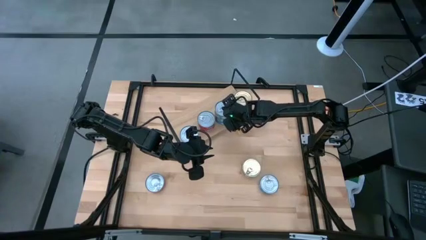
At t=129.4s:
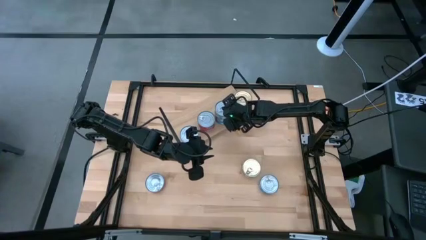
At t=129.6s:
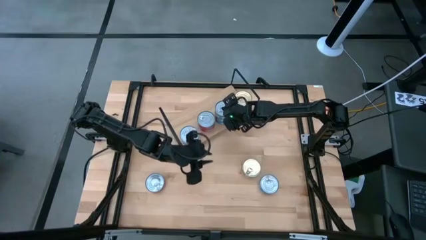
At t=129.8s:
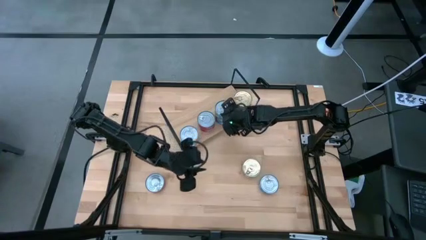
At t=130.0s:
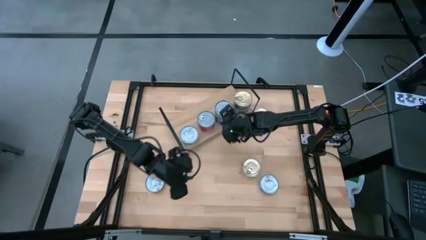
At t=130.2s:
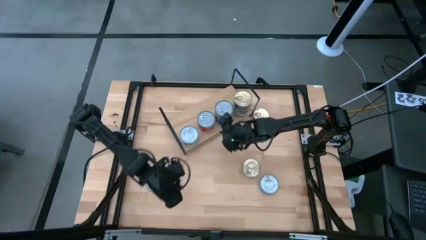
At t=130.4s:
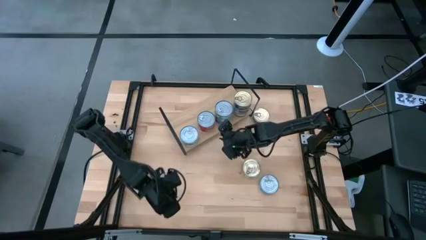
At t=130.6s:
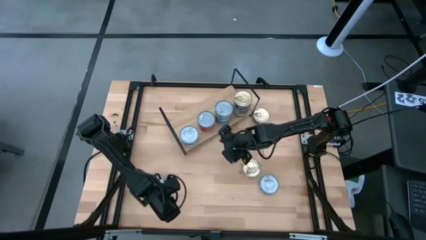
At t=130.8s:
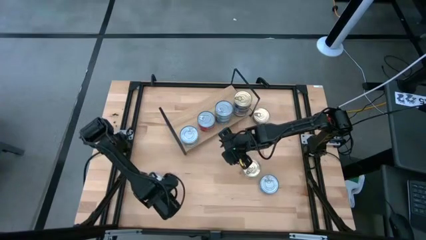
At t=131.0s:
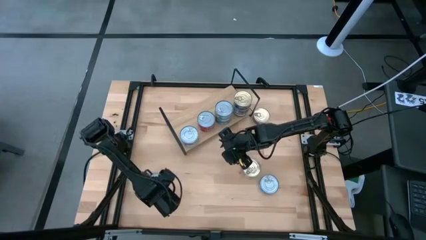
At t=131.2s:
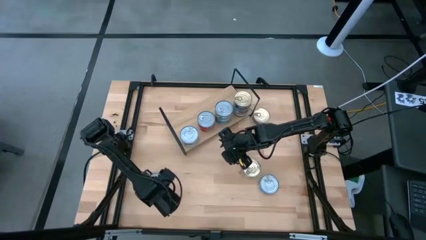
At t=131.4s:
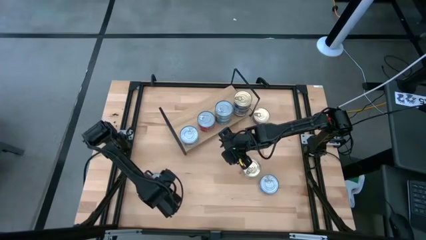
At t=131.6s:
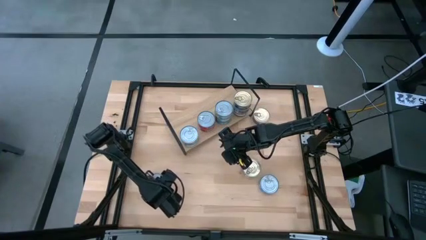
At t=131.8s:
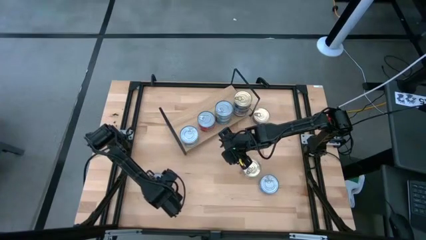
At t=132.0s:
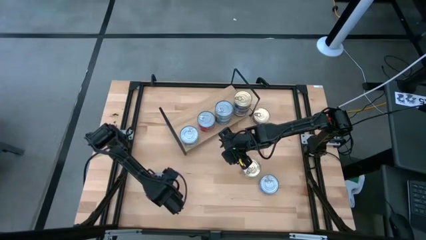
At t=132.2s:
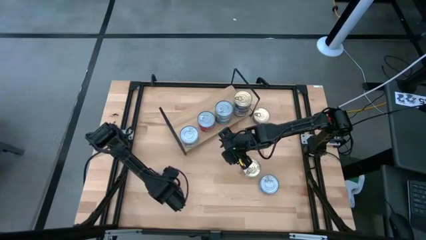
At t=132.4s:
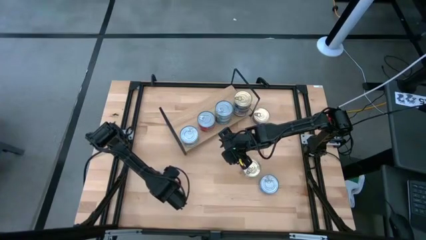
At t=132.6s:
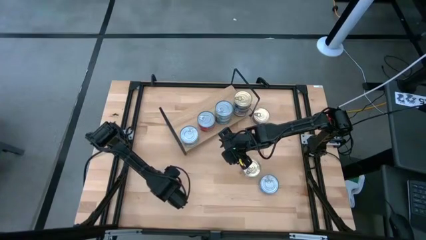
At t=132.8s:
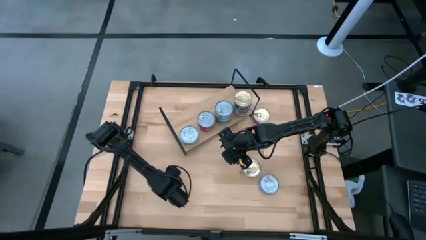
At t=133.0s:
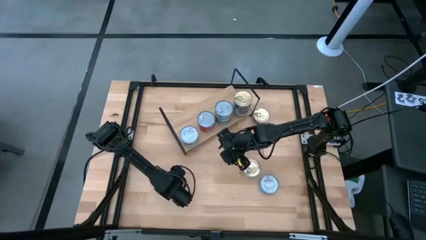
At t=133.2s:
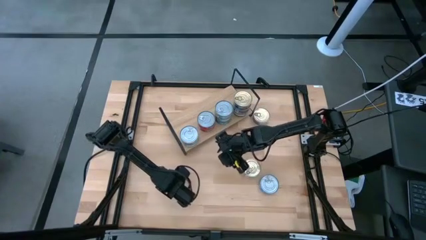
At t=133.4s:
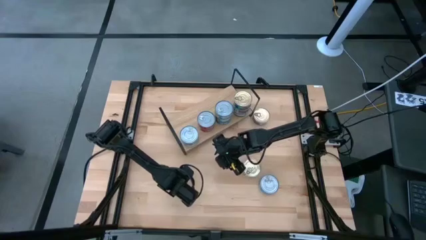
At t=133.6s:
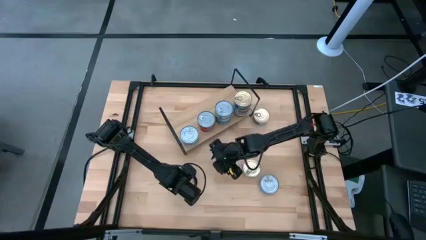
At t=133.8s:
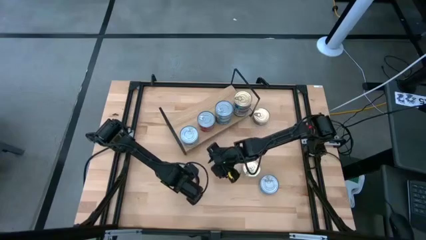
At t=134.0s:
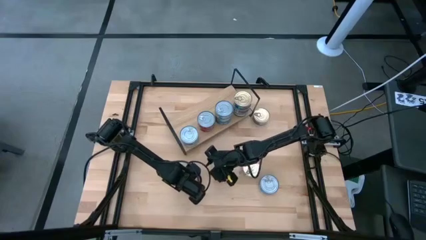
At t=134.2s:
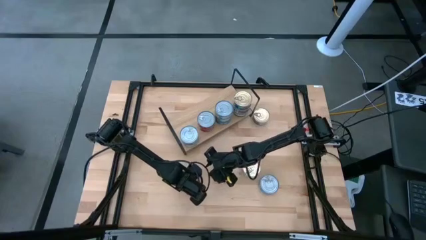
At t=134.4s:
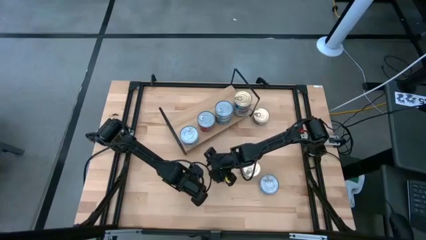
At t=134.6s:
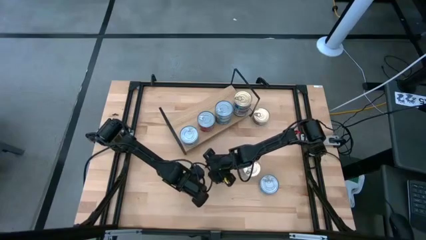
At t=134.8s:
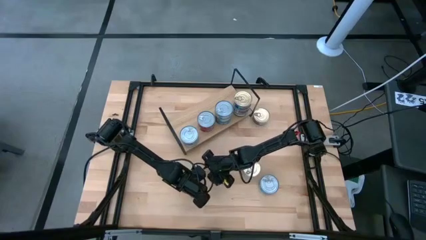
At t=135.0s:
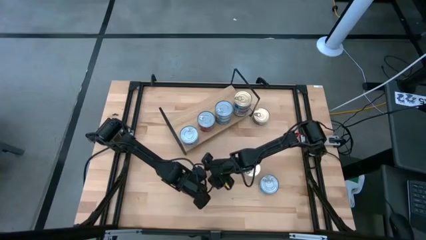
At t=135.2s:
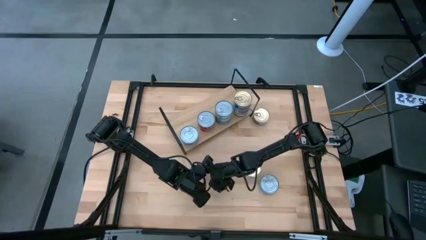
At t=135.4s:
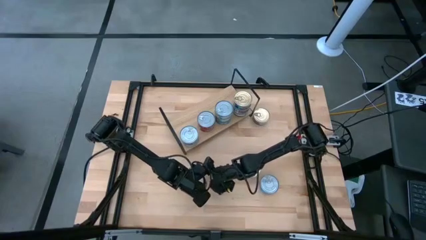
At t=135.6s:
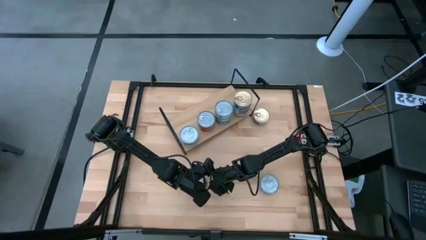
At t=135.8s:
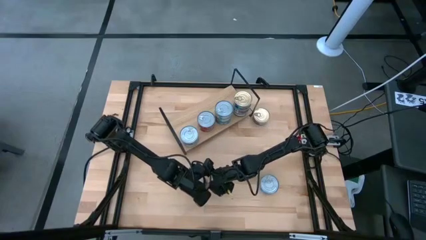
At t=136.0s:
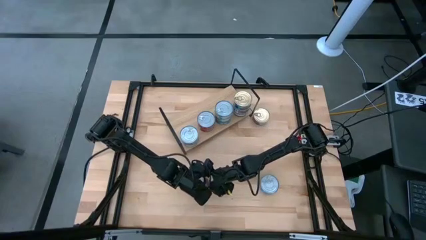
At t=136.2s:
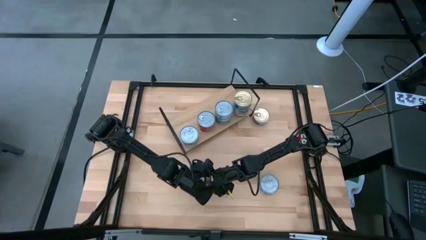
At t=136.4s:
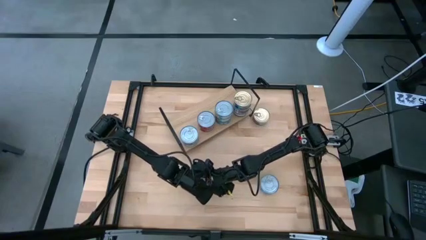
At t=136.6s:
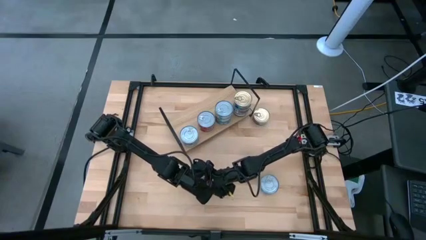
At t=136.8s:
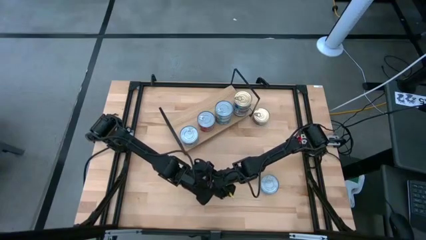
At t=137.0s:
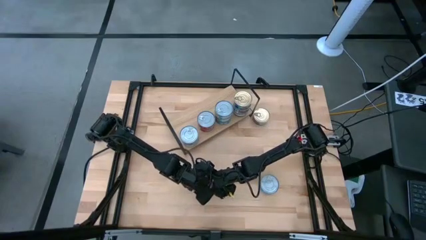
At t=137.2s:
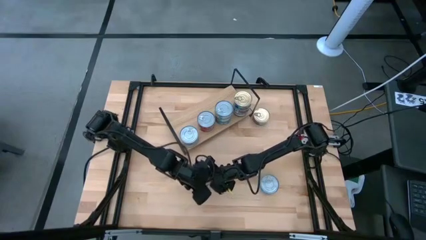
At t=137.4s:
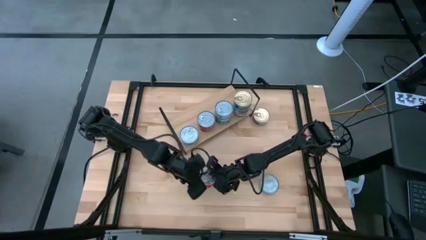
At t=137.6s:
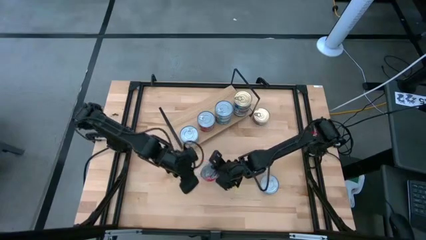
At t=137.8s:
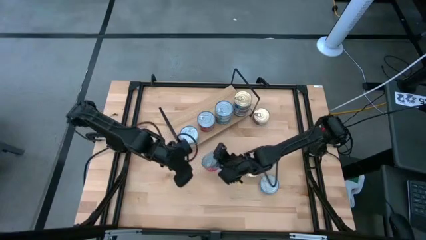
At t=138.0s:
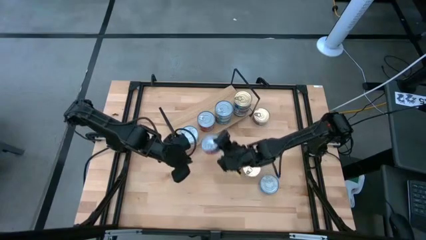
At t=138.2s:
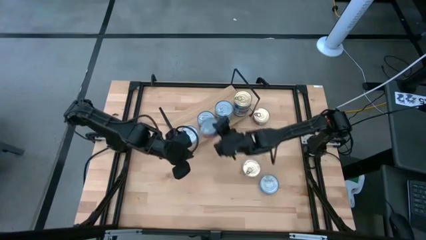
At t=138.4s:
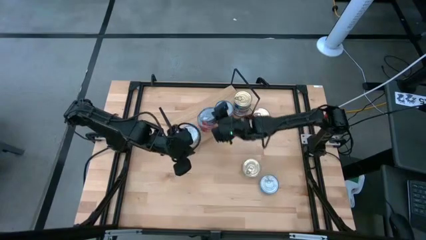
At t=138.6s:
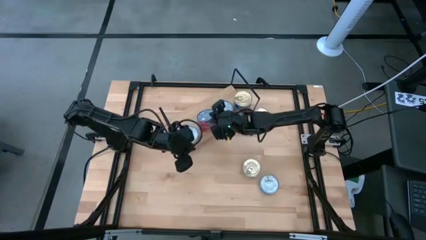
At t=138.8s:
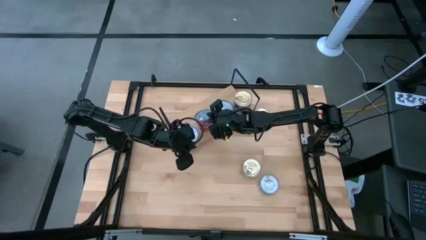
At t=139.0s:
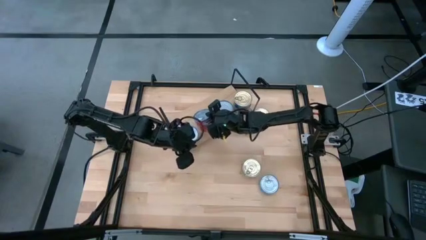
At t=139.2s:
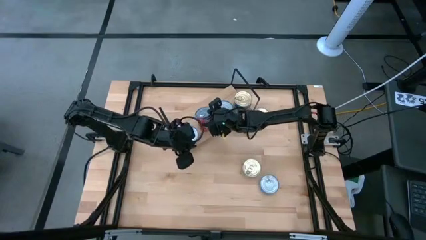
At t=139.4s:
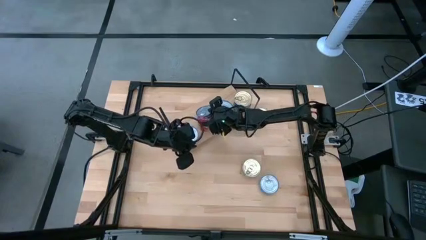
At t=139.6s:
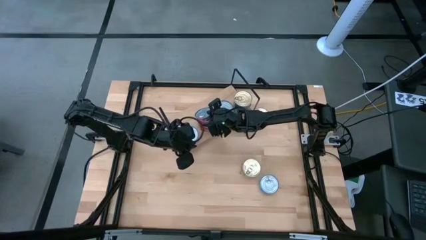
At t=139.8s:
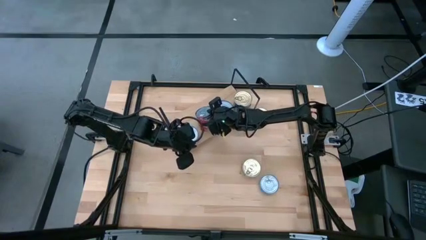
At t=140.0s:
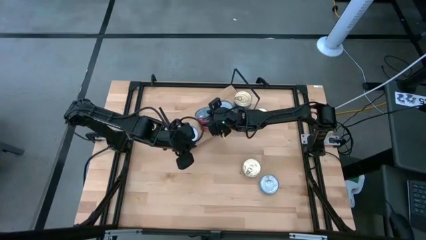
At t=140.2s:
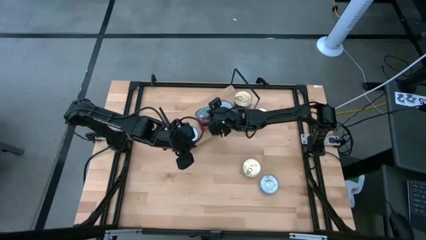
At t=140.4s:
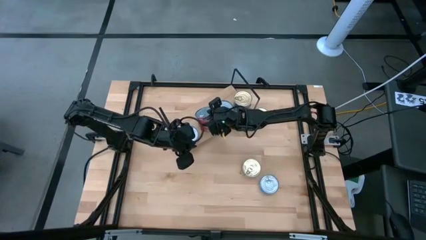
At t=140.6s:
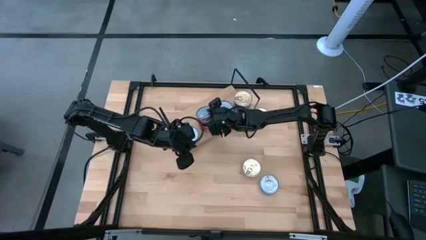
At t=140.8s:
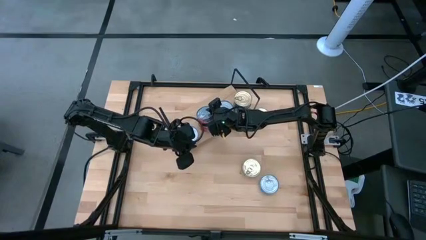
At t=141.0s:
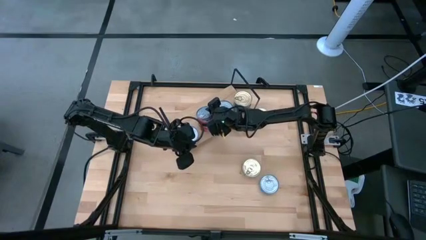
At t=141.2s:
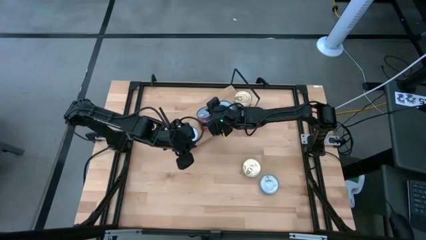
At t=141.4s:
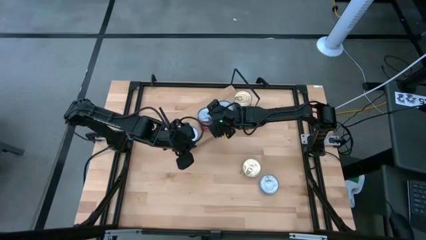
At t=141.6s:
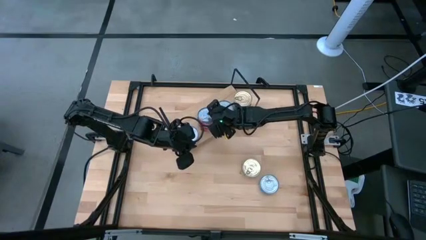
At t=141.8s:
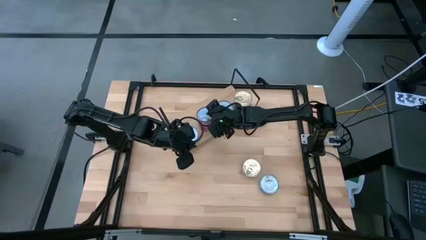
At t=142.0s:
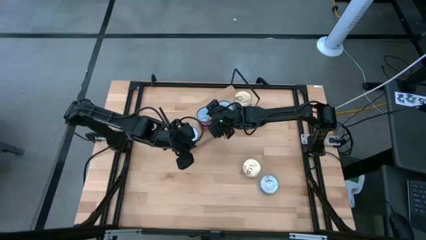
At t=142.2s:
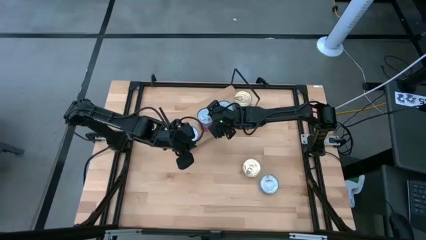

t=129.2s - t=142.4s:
Task: Stack canned seafood by type on shelf
Stack the red tuna can on top of the red tuna cans on the shelf

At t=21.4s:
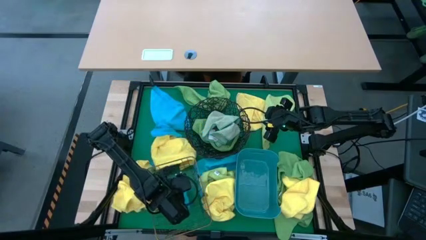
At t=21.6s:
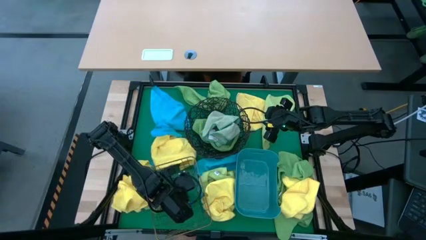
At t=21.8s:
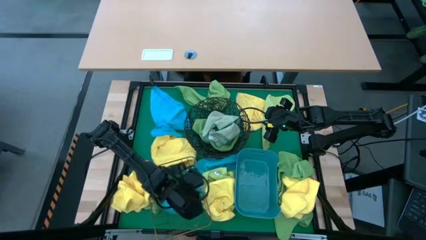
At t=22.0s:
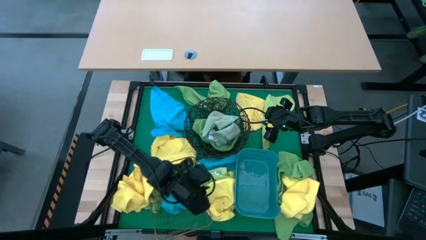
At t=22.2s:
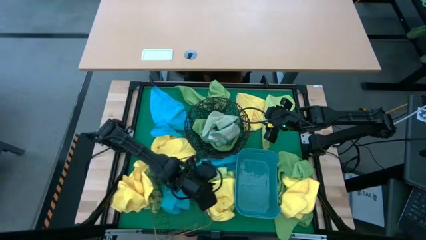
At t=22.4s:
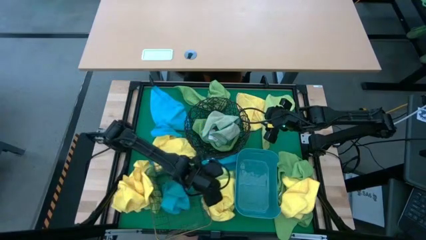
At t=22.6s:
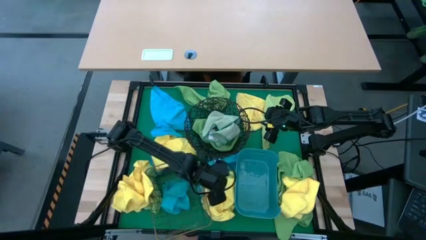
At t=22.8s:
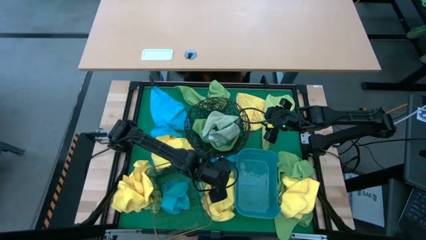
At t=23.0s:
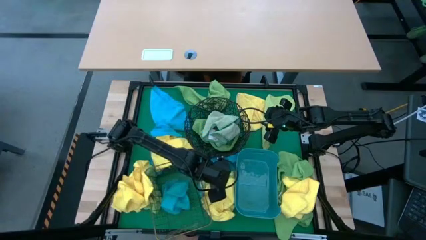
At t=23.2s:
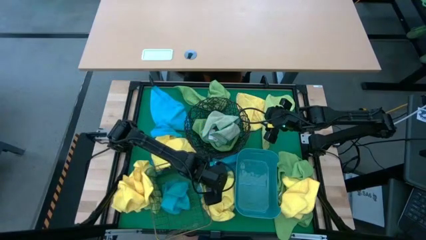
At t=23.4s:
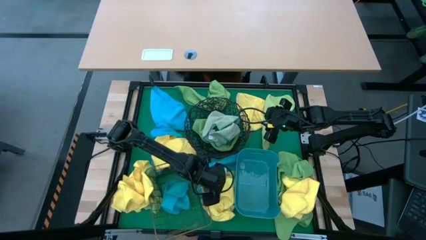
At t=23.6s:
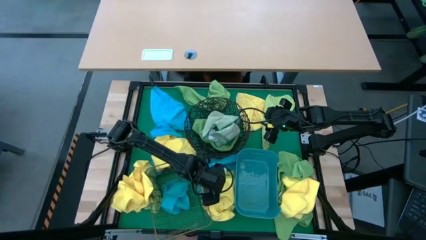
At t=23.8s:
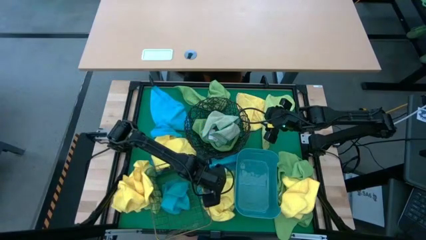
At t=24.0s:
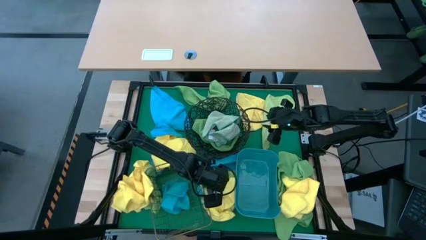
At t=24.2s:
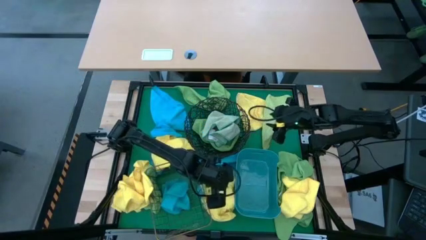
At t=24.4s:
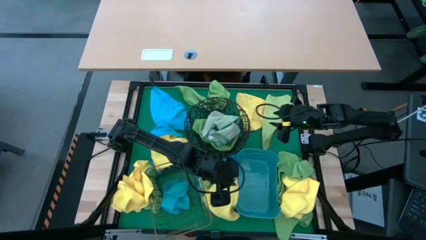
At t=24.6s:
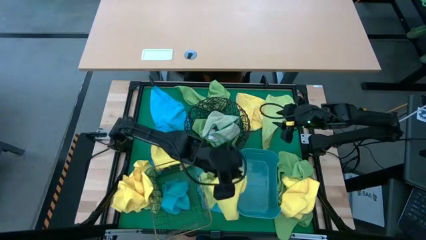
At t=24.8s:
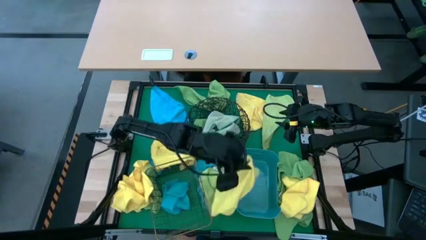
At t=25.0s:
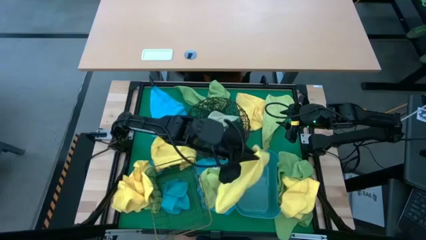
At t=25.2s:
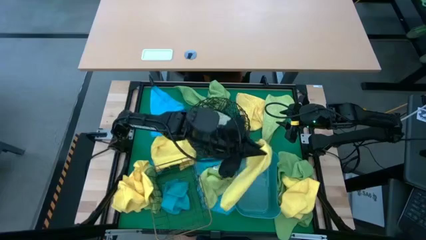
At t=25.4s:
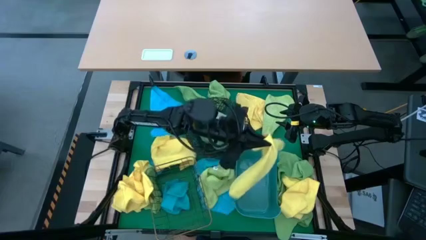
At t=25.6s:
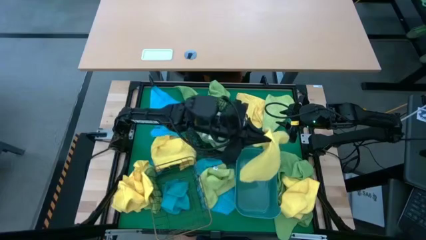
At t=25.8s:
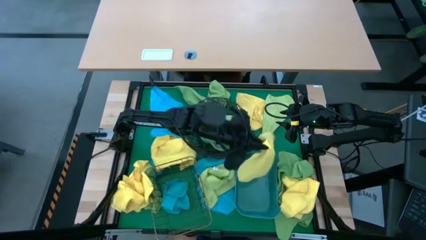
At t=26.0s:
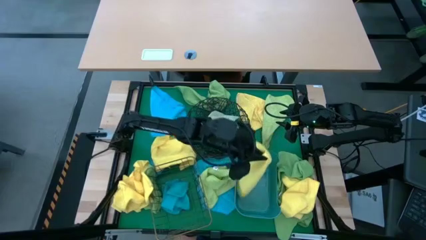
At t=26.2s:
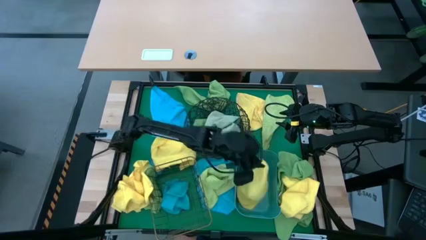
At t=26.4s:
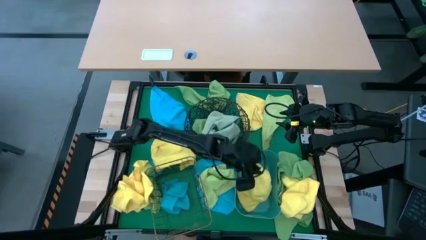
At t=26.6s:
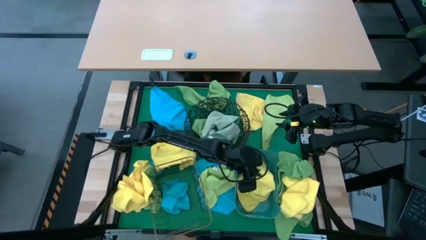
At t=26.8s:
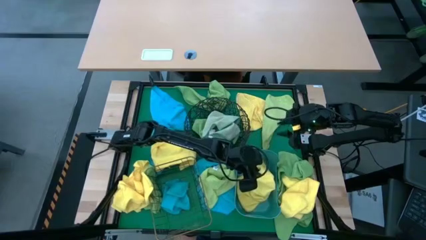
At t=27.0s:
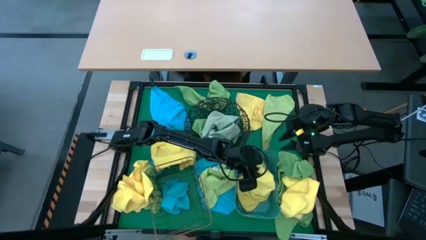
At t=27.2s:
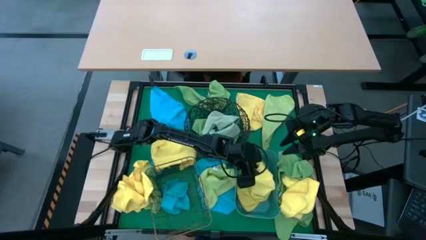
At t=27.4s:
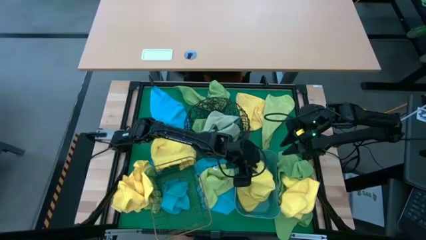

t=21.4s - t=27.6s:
Task: Sort microfiber towel by color & place in baskets
Put the yellow microfiber cloth into the blue bin
